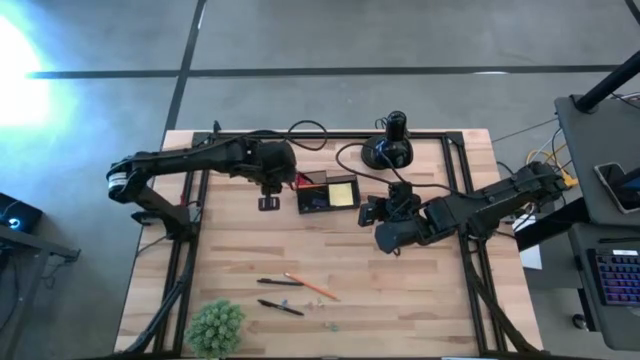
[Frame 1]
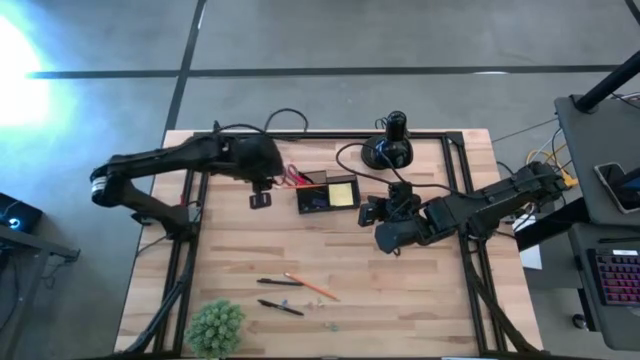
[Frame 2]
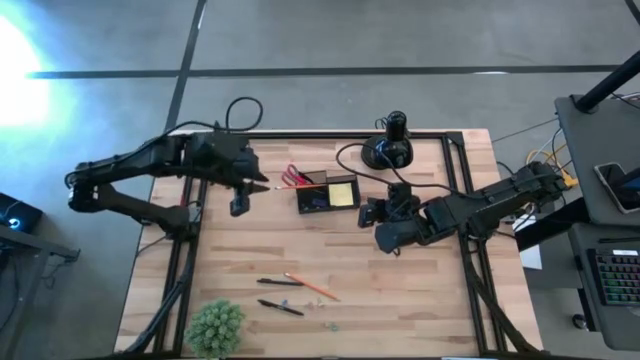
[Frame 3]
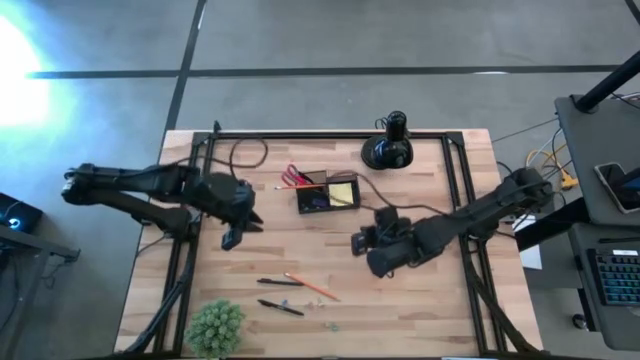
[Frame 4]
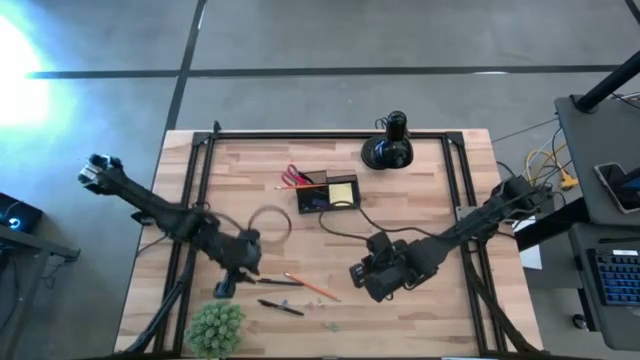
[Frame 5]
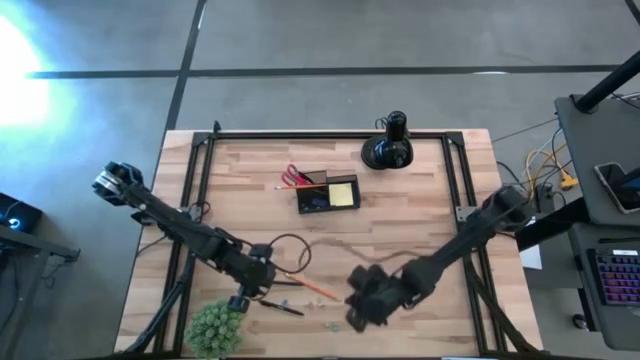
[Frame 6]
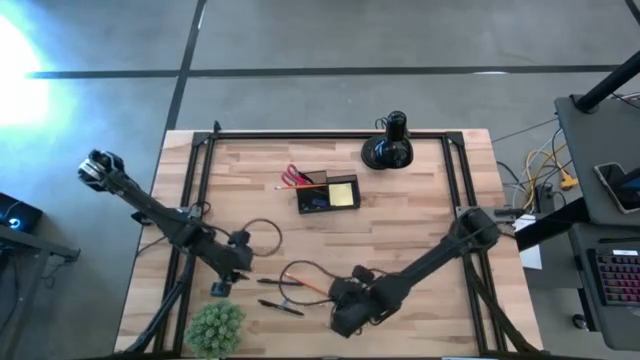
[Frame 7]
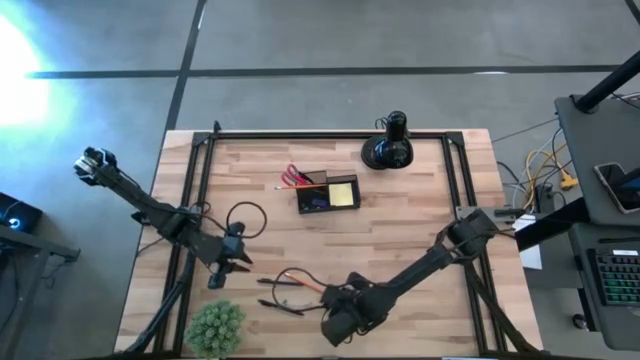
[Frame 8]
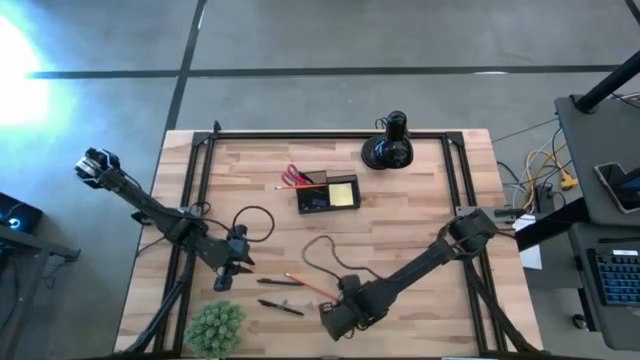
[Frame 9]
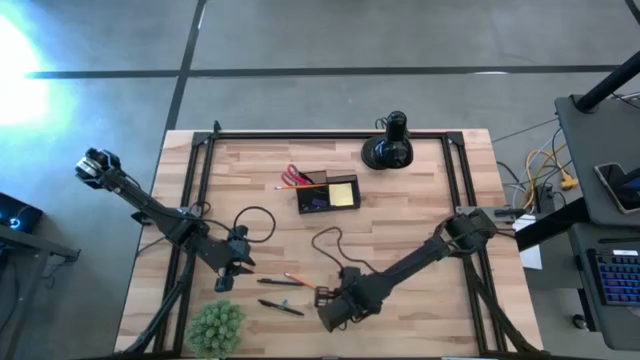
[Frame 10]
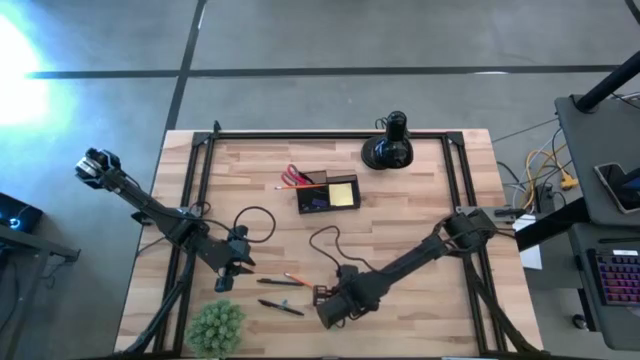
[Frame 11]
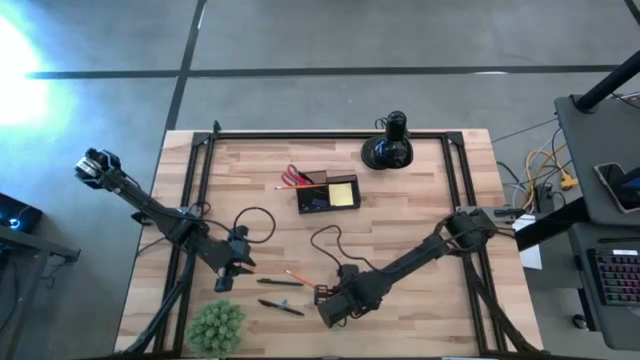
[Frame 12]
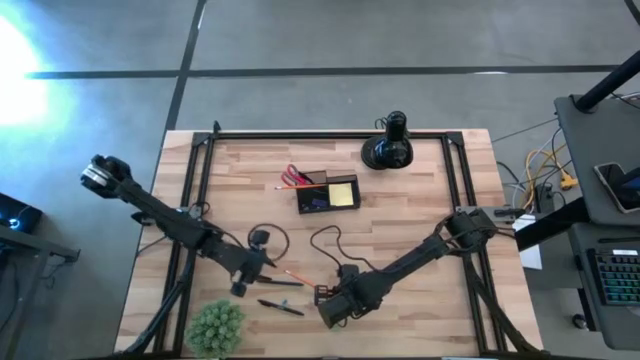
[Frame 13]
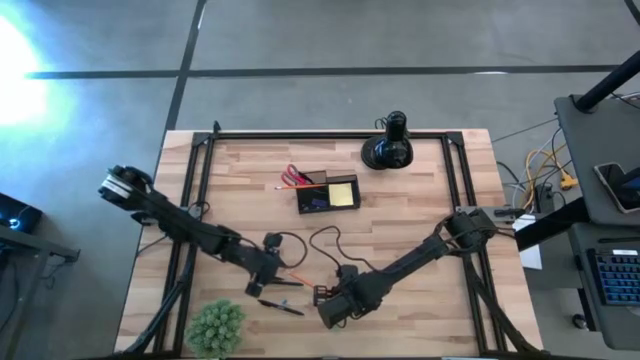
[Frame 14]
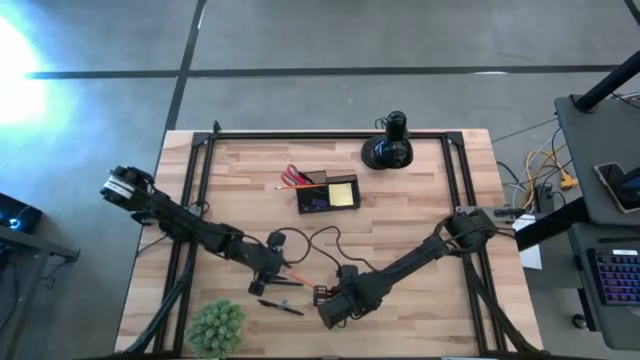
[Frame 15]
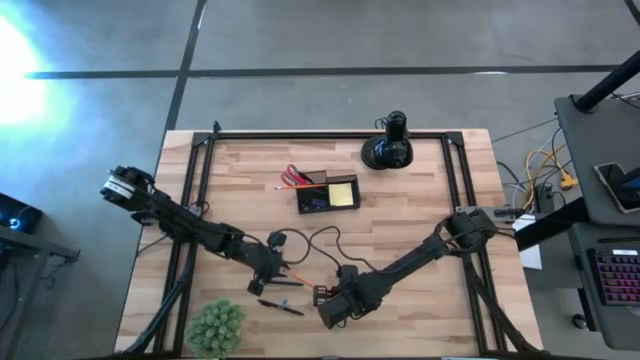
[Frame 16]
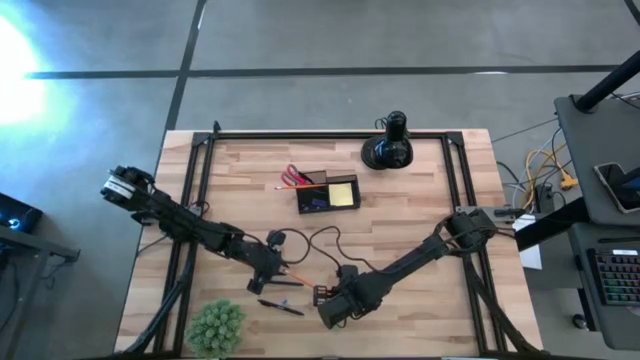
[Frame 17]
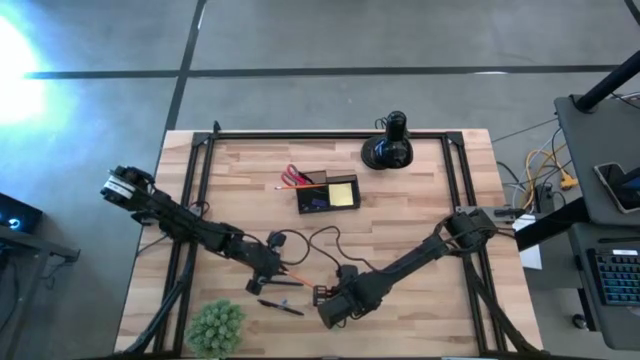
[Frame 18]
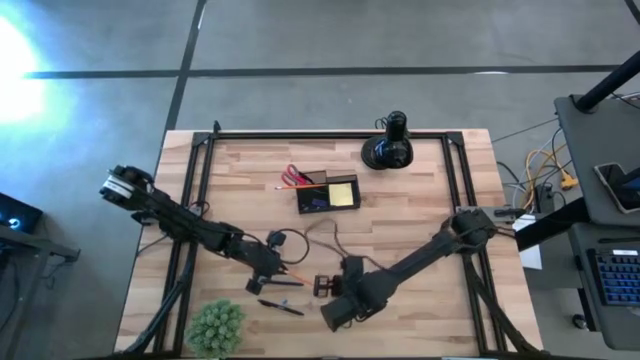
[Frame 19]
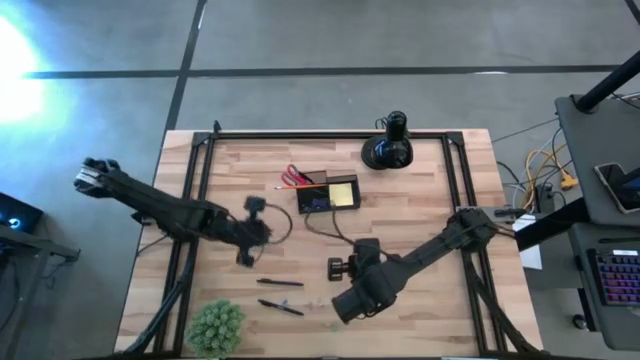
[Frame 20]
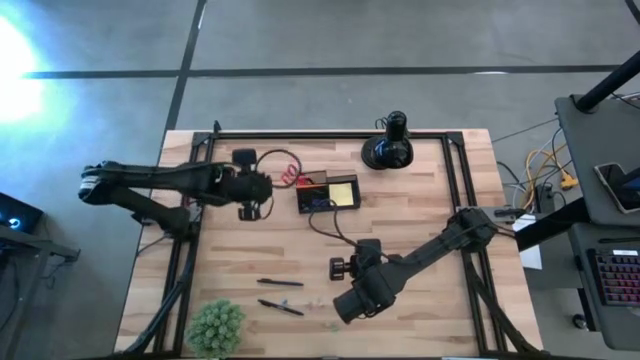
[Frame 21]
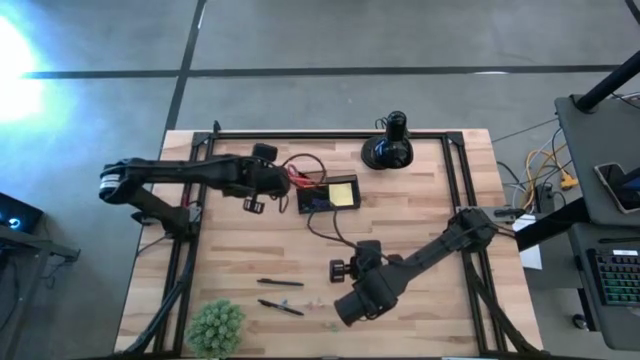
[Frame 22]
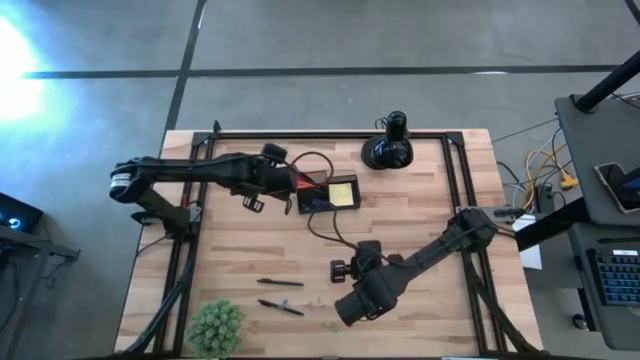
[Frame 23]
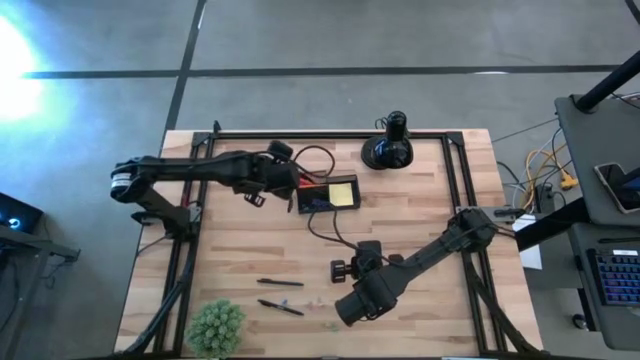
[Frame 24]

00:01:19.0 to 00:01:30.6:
Task: Pick and place office supplies into organizer
Put the pencil into the black organizer

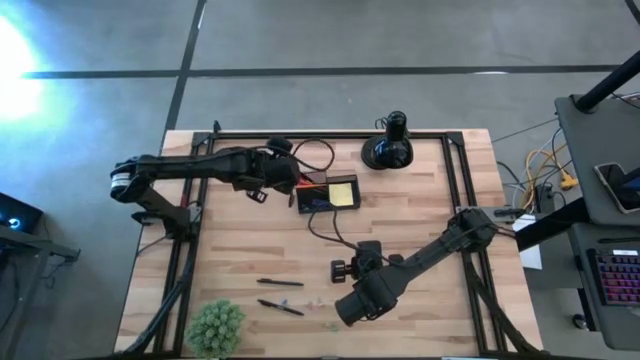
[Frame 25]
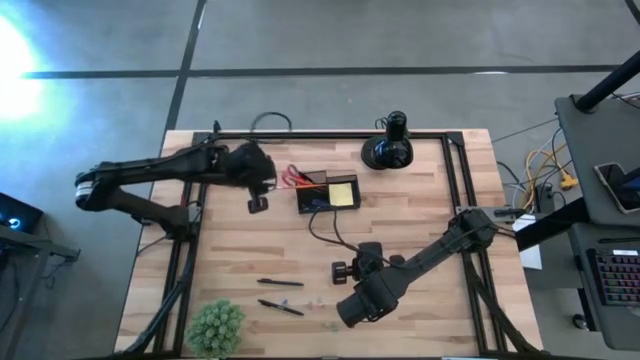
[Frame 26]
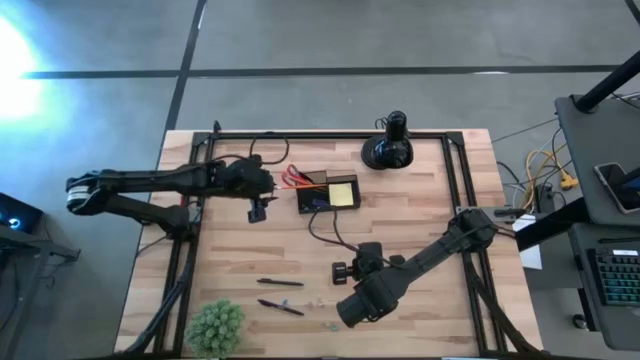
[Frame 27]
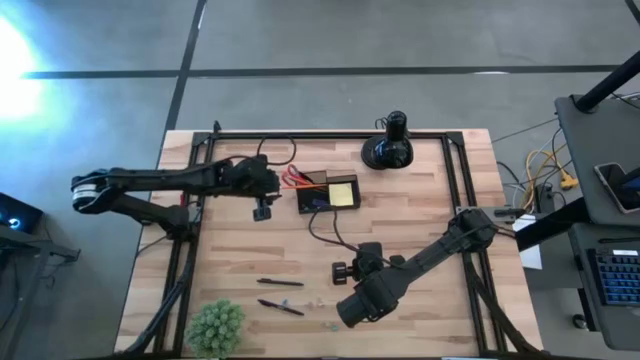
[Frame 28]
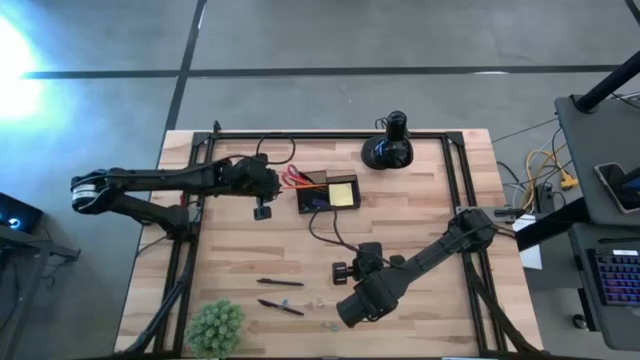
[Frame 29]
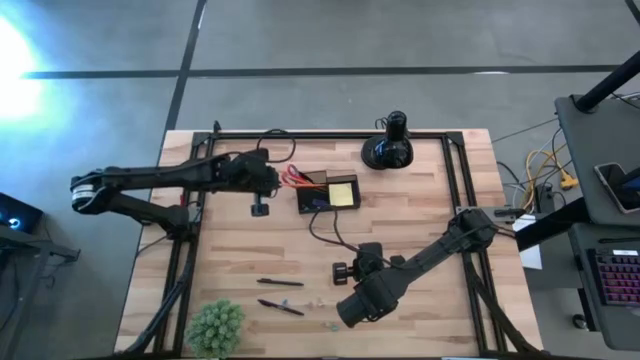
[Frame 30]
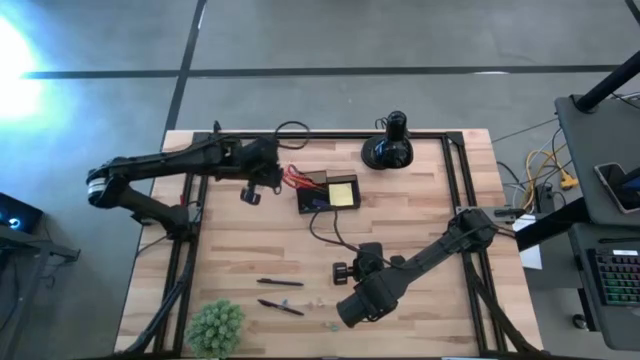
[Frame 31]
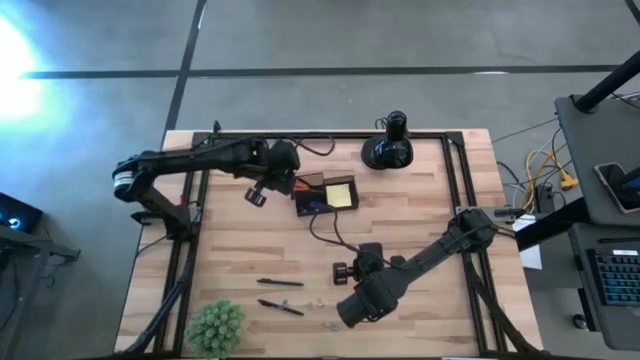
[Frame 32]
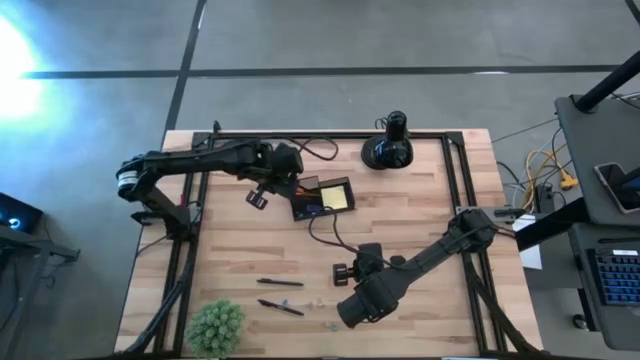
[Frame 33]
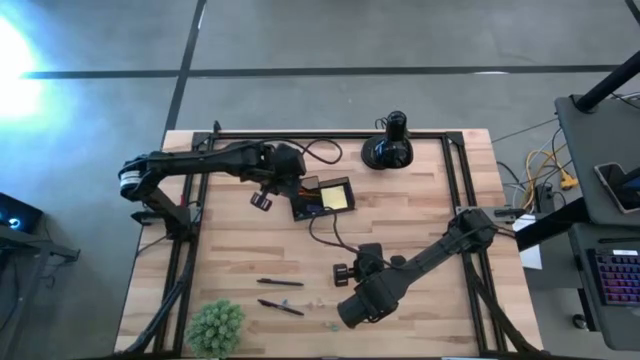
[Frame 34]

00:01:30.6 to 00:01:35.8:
Adjust the pencil in the black organizer

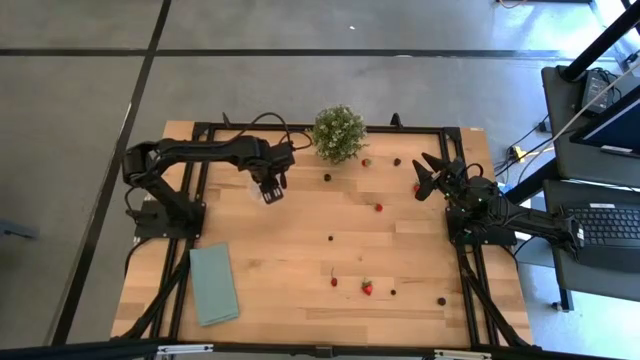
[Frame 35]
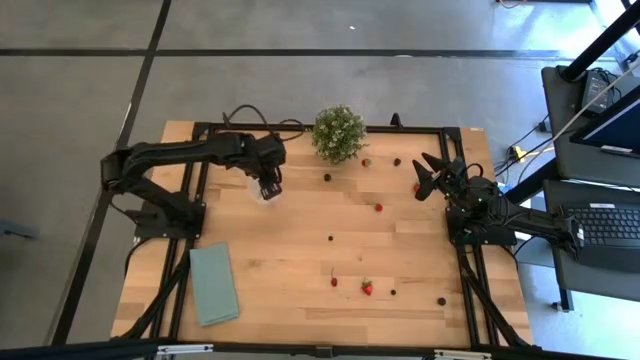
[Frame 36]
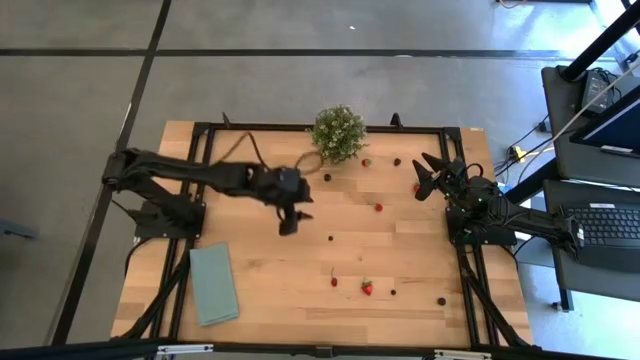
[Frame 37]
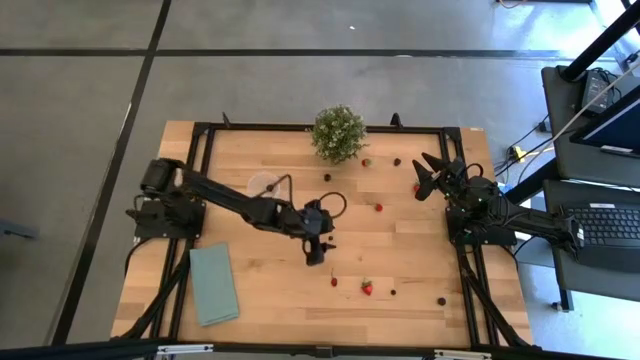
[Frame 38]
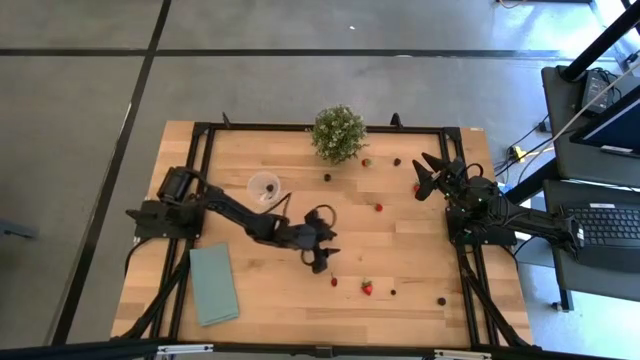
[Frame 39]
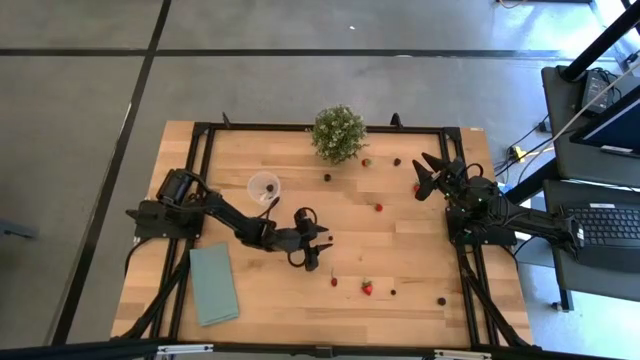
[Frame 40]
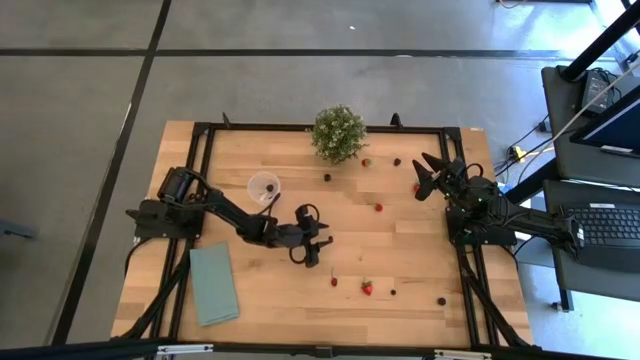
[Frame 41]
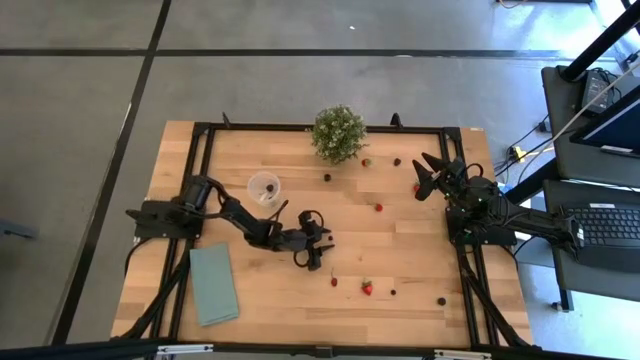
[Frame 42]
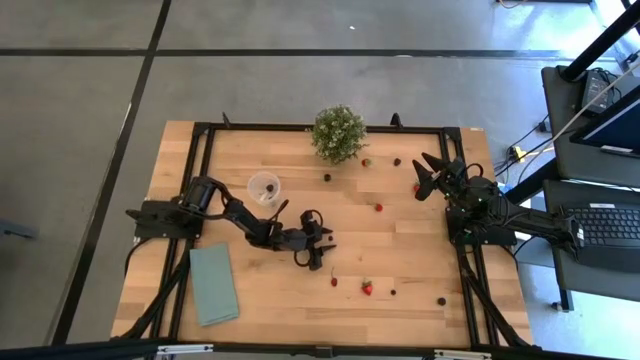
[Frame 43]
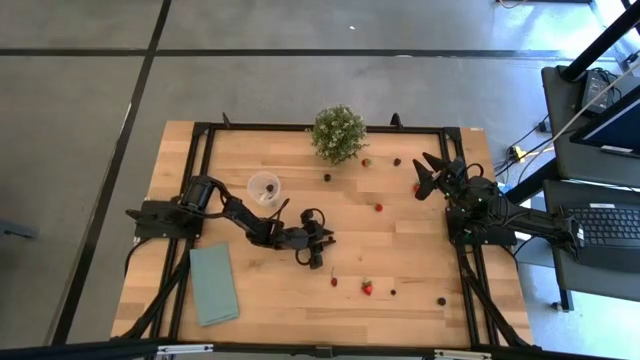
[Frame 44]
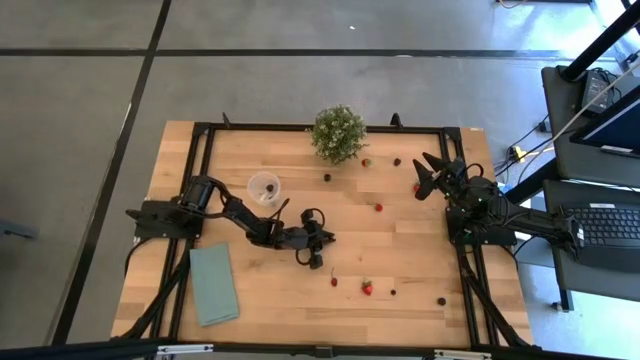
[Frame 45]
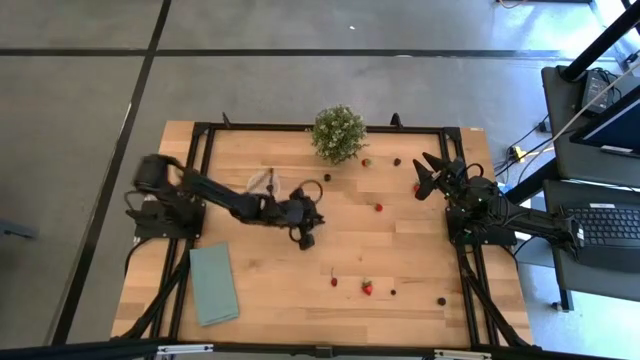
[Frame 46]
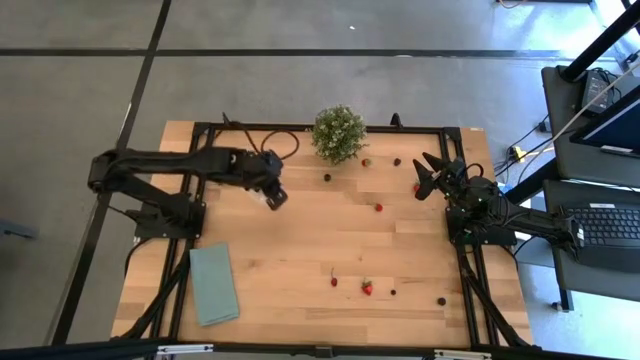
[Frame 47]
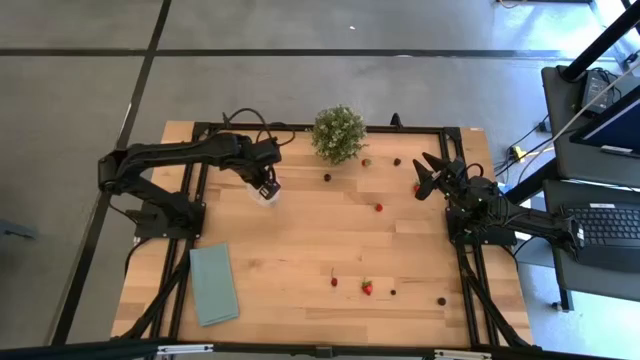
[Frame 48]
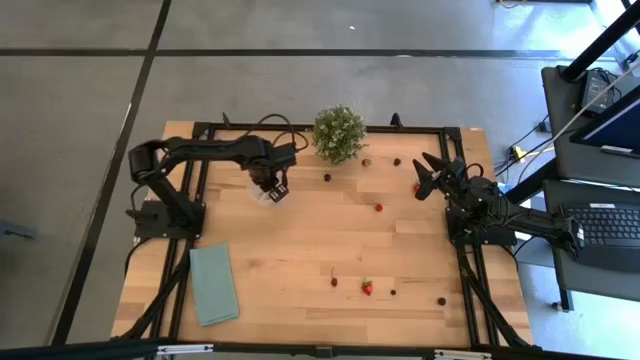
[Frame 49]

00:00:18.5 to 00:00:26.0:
Task: Pick and placing Produce into tupperware
Put the blueberry into the transparent container
